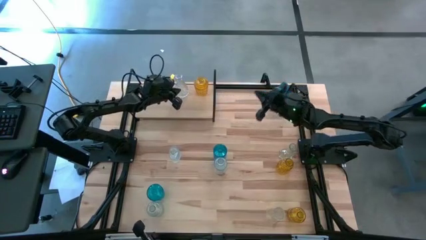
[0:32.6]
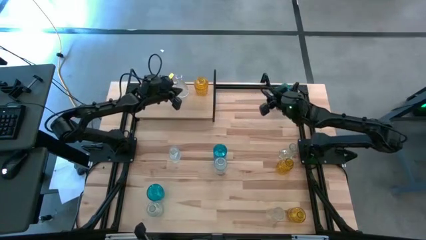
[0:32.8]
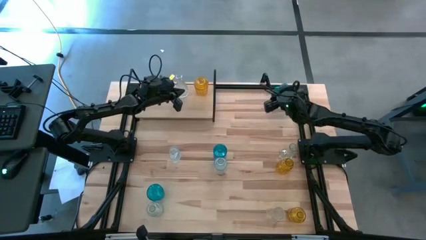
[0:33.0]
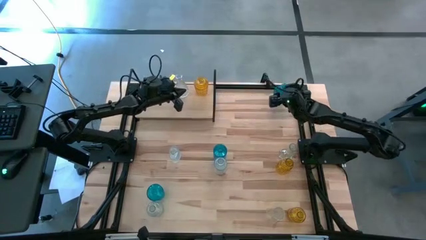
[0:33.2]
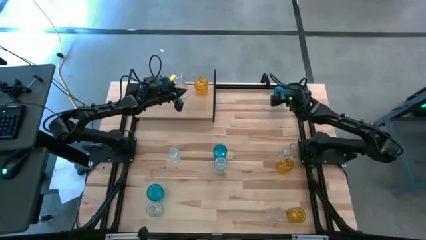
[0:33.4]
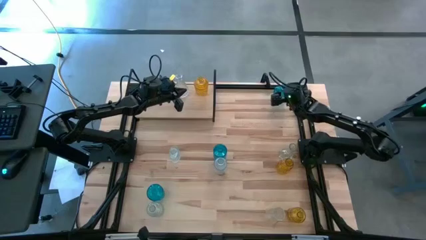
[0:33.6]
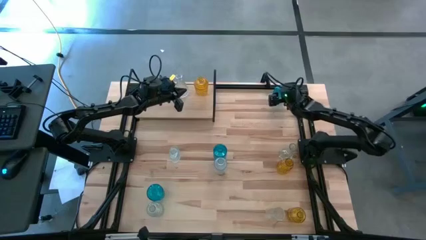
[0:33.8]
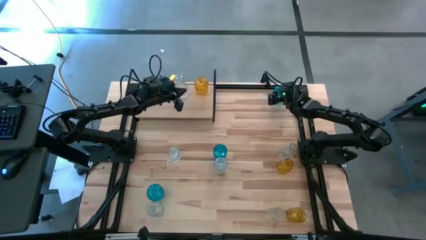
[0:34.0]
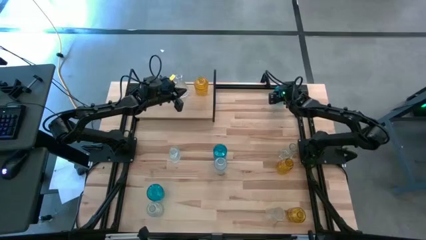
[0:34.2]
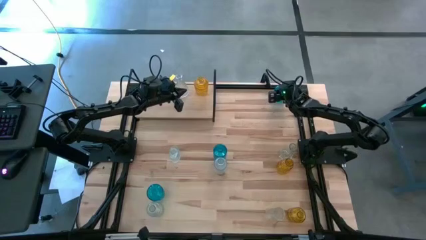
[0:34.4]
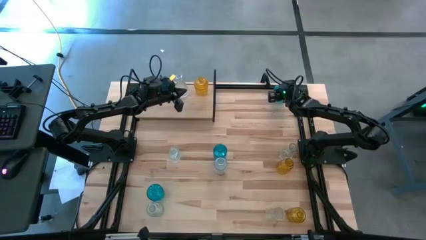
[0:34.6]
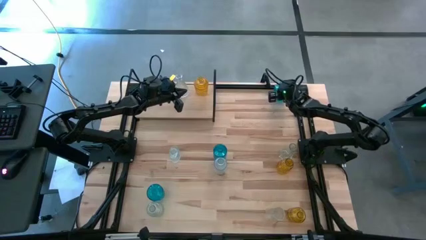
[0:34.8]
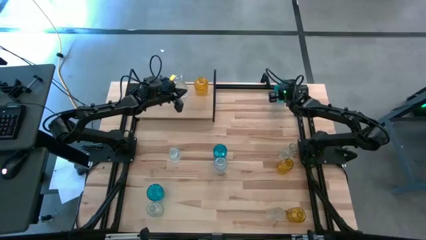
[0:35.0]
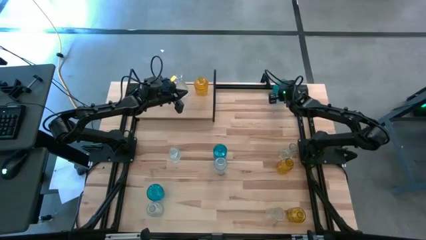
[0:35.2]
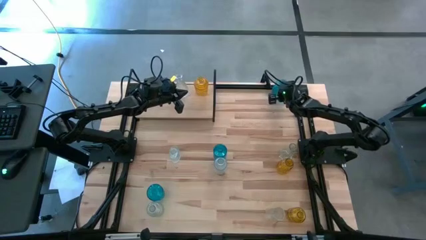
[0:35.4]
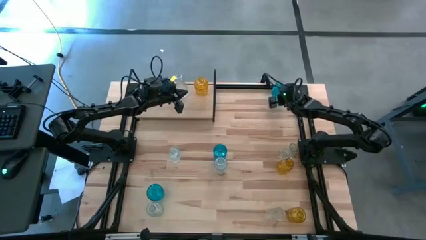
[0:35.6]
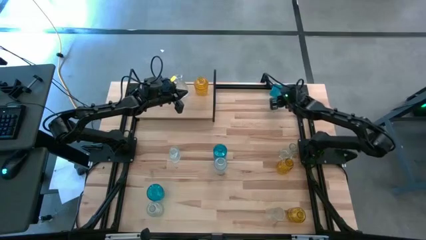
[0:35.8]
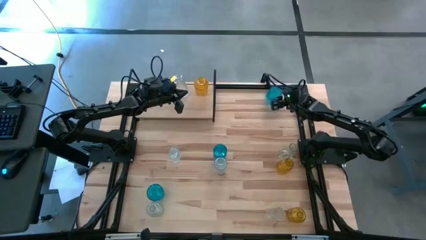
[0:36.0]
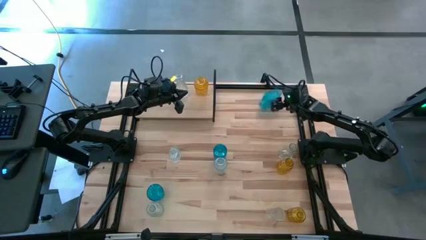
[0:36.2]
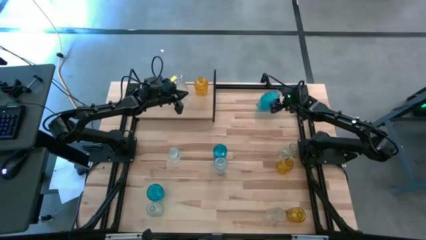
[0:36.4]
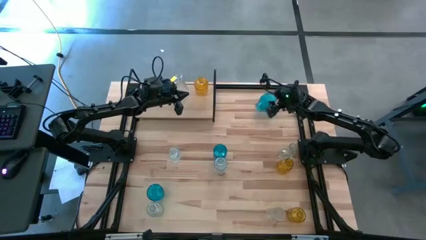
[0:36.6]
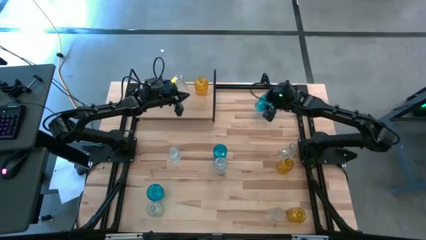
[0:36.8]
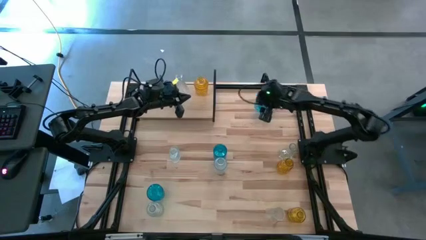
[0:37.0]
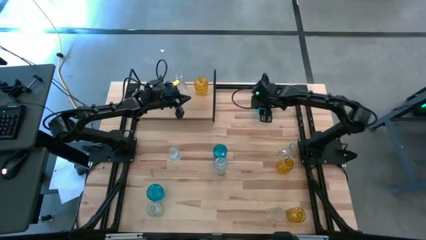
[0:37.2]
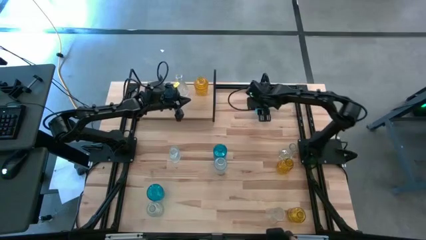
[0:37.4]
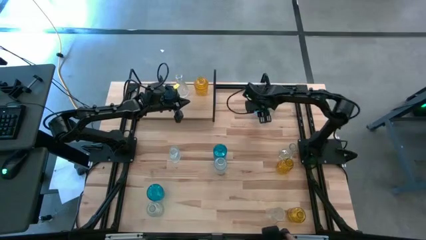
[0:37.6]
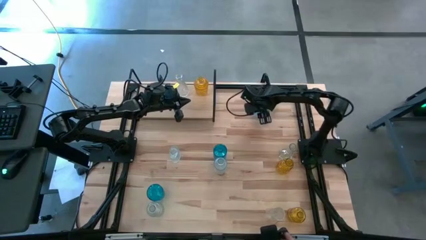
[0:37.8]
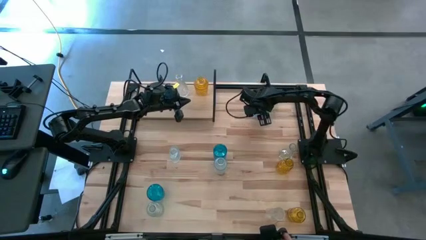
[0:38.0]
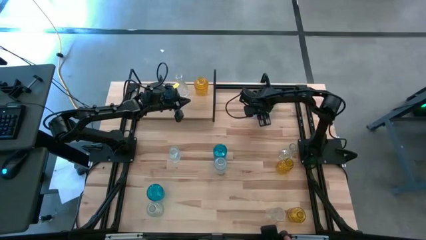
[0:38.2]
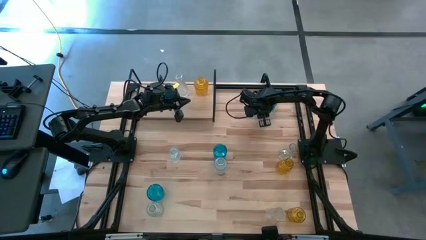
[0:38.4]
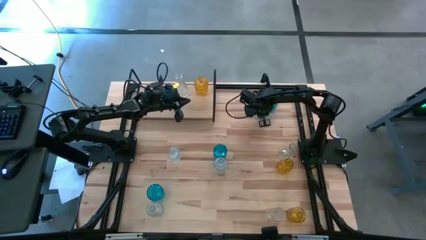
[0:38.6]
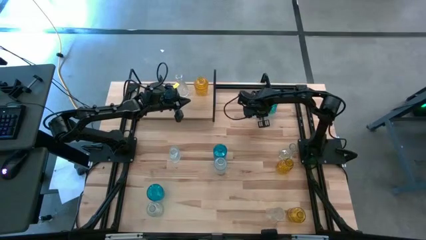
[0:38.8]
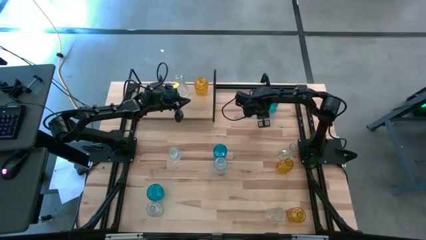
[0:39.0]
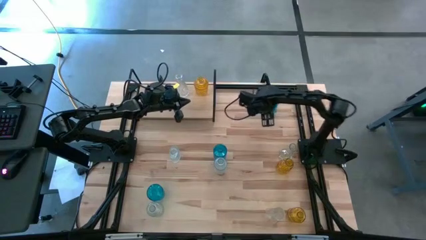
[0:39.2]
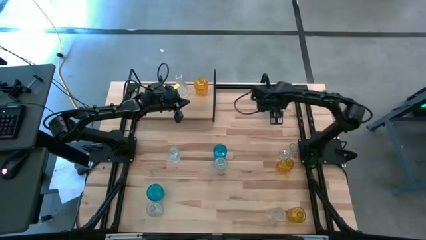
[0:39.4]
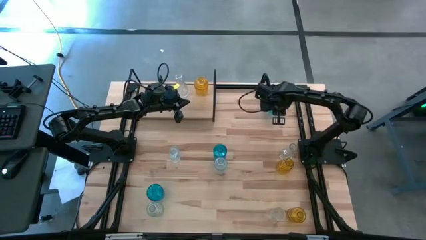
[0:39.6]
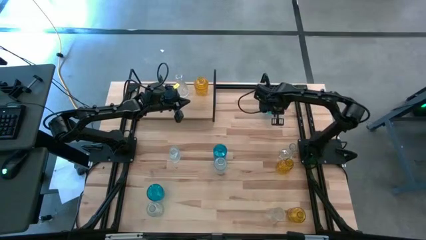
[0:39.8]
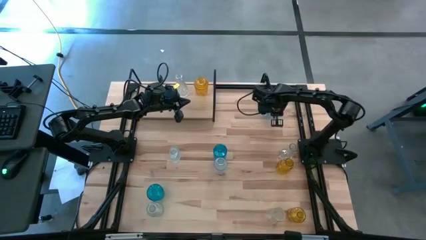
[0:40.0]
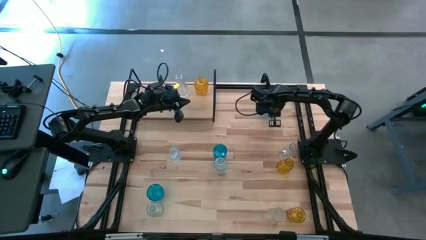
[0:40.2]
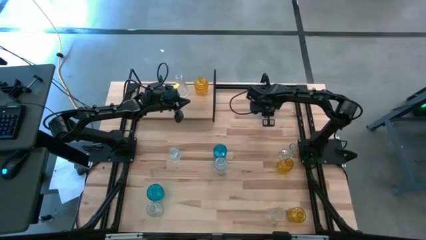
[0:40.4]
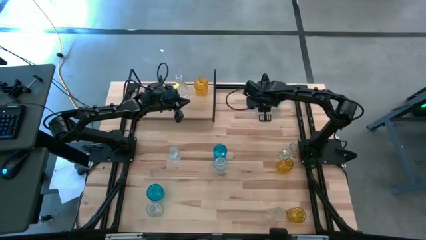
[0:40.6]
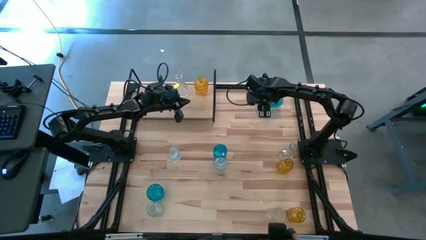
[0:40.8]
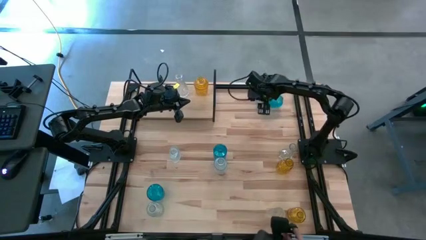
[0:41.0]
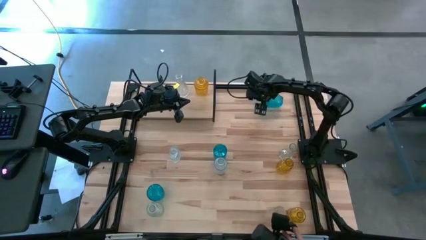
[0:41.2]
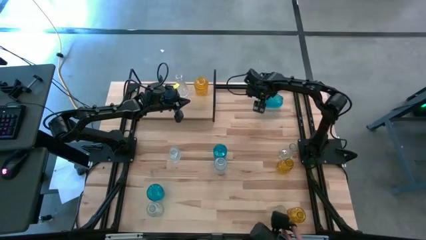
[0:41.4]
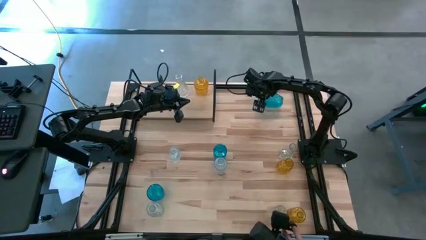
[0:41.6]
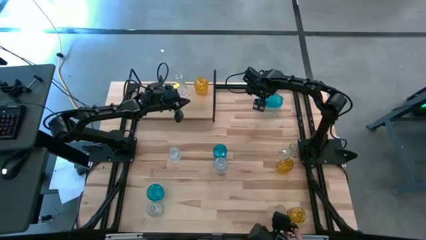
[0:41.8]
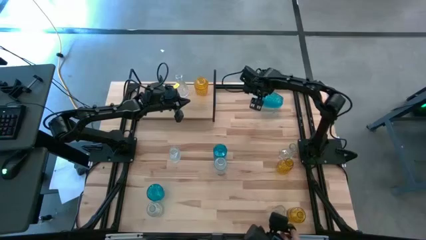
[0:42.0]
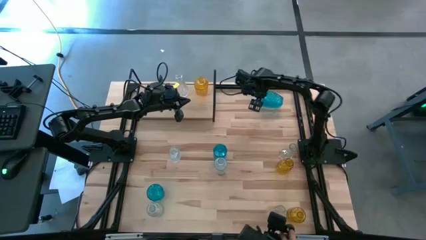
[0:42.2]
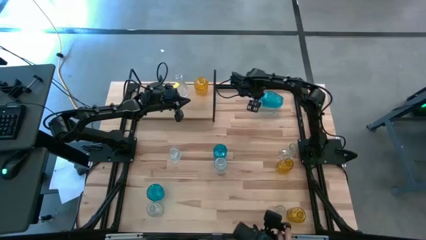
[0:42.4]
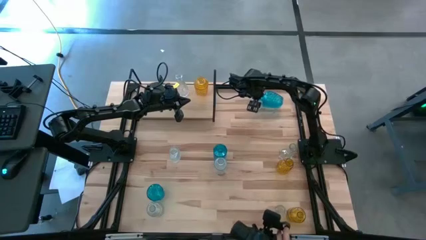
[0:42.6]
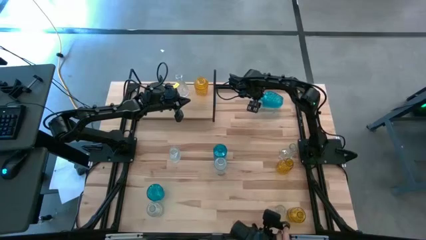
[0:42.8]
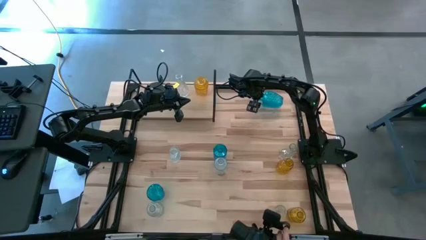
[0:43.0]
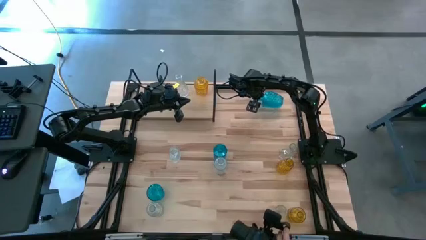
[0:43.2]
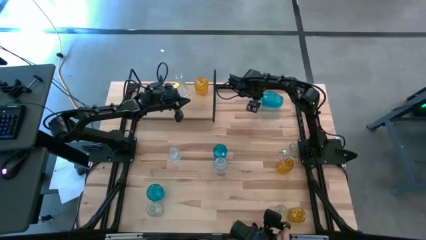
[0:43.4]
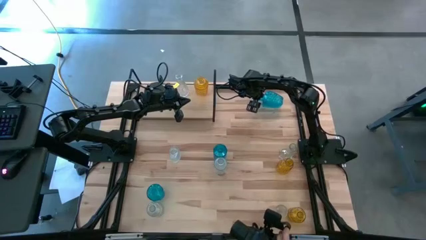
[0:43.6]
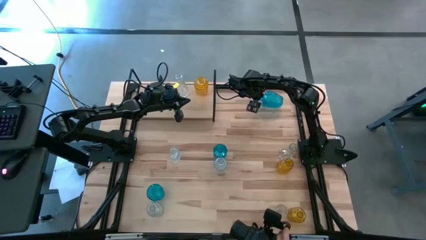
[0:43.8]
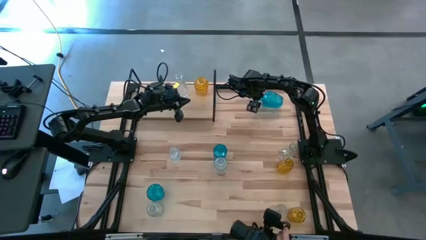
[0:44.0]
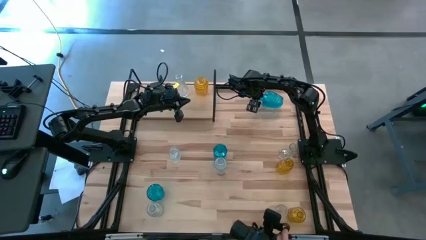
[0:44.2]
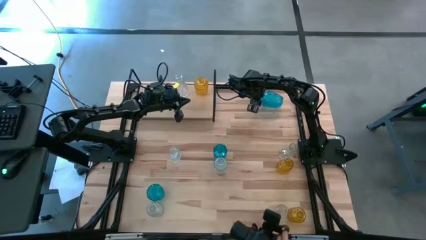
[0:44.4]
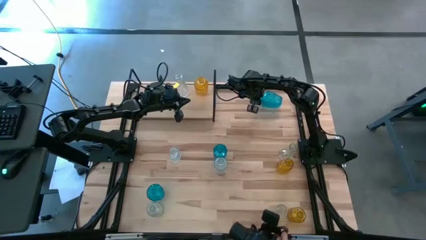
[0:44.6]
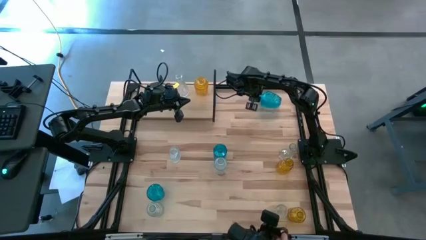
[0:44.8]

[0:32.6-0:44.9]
Task: sort vases onto shelf
Put the blue vase on the shelf
